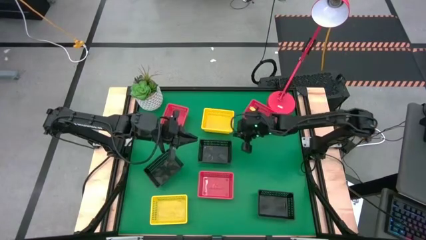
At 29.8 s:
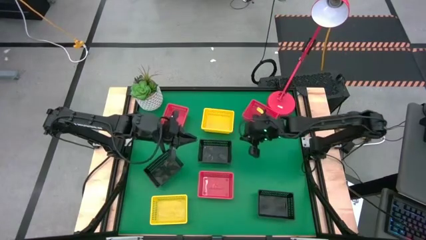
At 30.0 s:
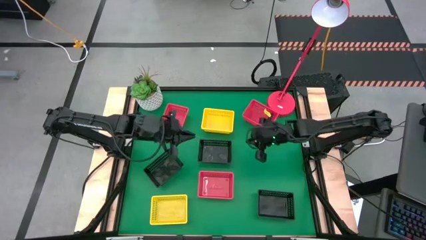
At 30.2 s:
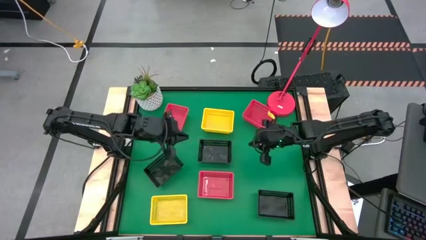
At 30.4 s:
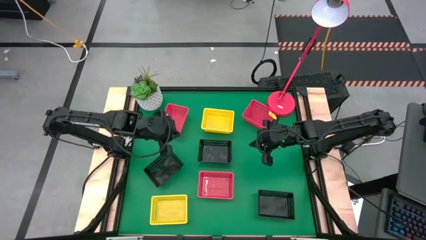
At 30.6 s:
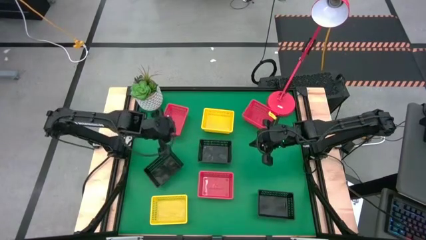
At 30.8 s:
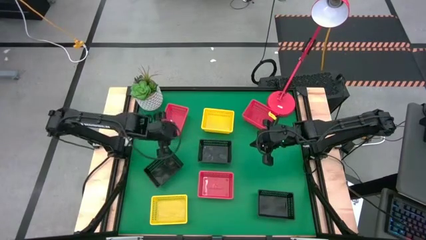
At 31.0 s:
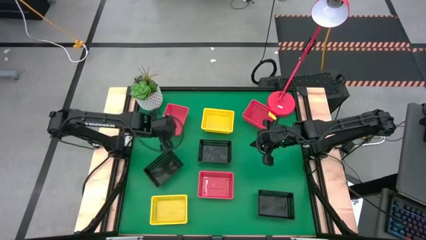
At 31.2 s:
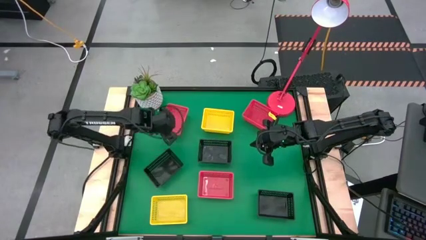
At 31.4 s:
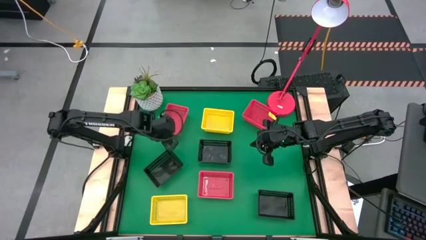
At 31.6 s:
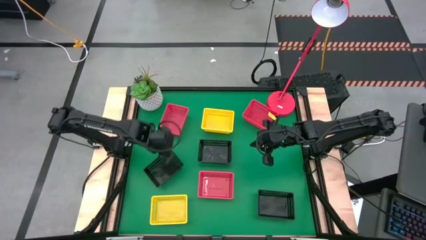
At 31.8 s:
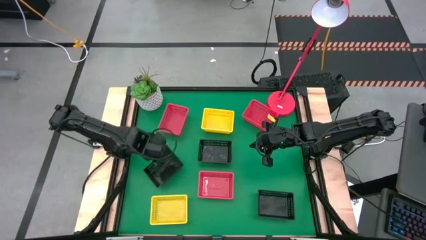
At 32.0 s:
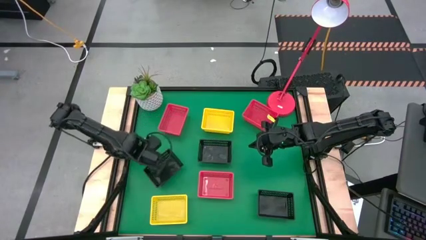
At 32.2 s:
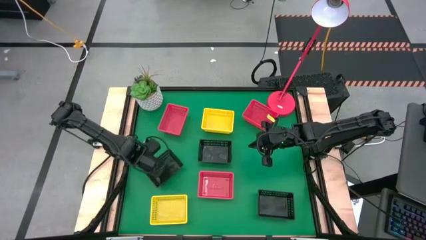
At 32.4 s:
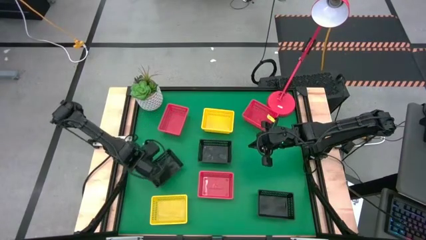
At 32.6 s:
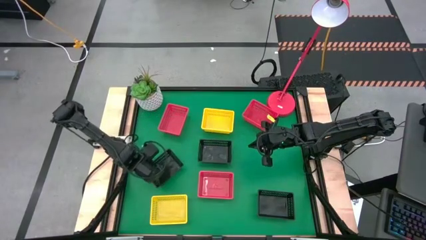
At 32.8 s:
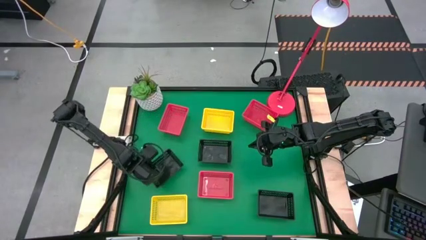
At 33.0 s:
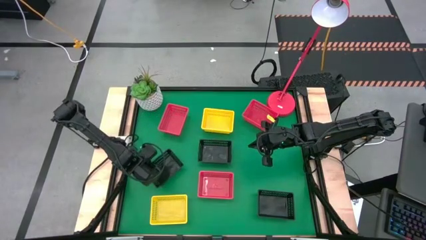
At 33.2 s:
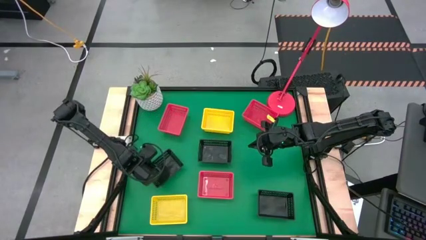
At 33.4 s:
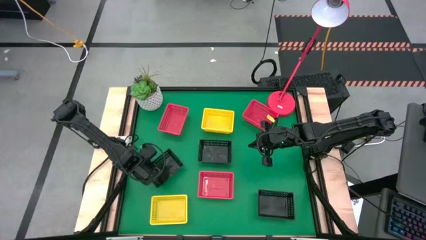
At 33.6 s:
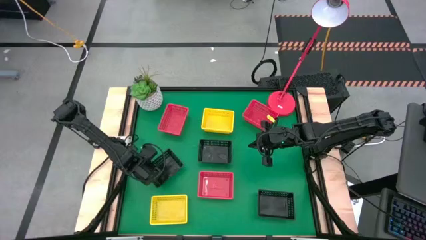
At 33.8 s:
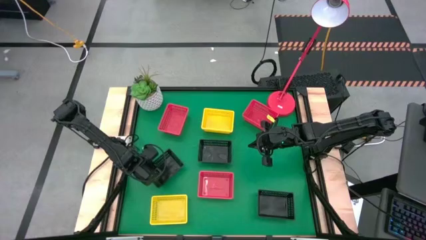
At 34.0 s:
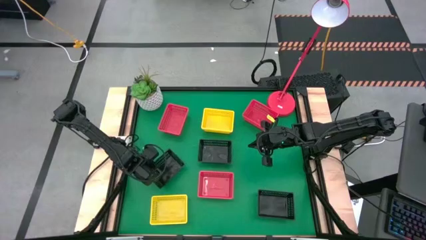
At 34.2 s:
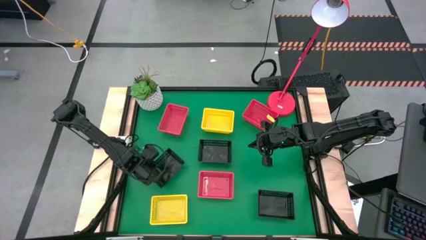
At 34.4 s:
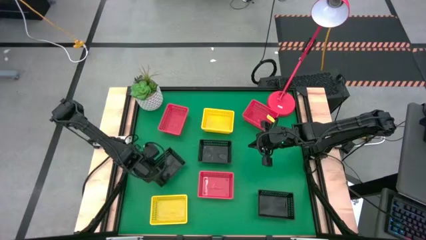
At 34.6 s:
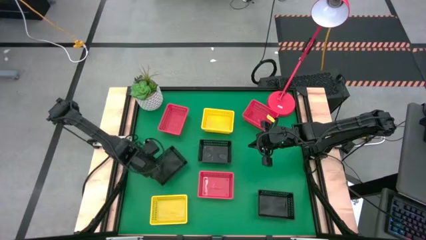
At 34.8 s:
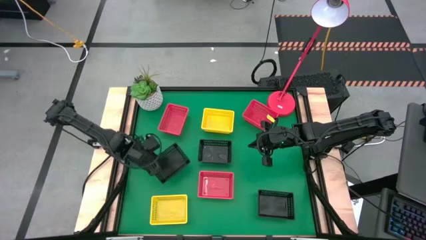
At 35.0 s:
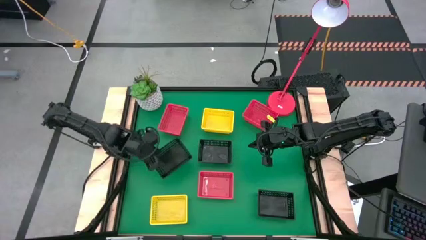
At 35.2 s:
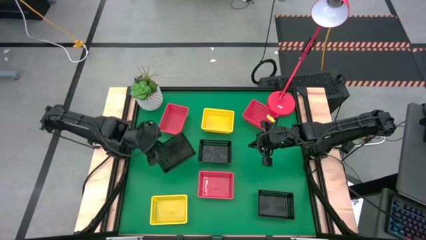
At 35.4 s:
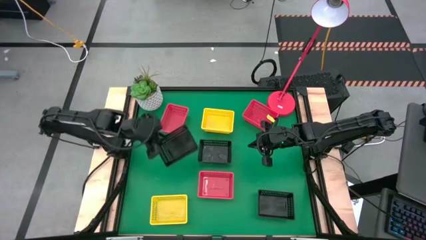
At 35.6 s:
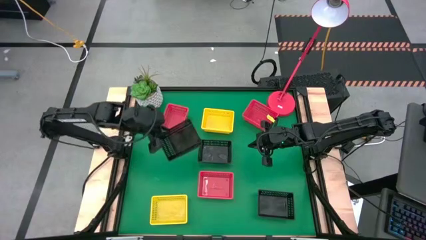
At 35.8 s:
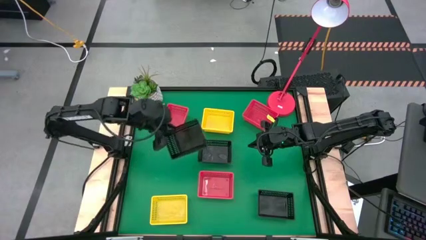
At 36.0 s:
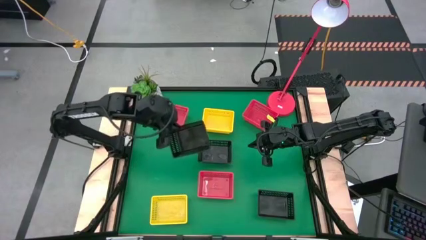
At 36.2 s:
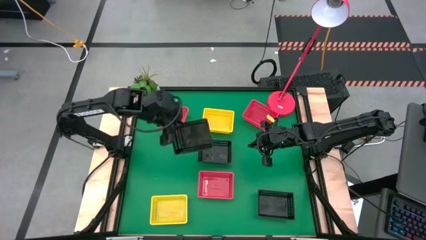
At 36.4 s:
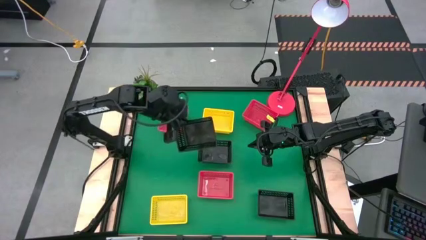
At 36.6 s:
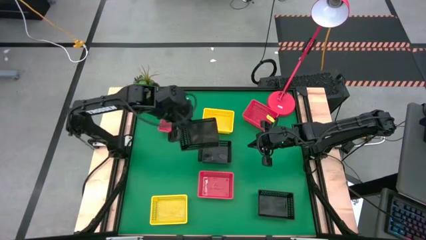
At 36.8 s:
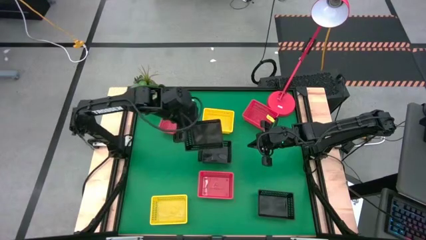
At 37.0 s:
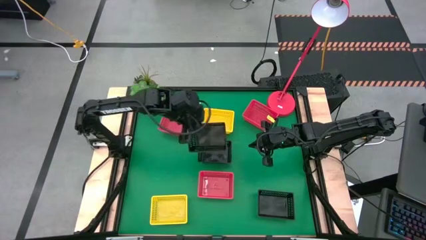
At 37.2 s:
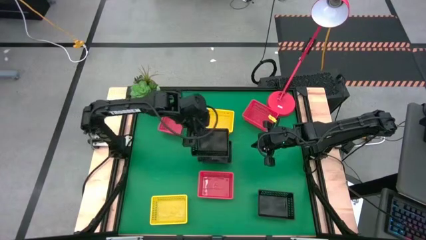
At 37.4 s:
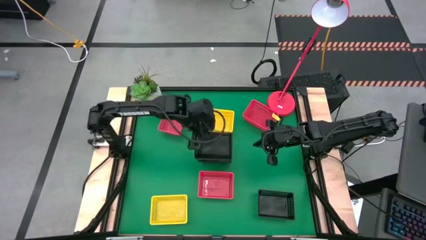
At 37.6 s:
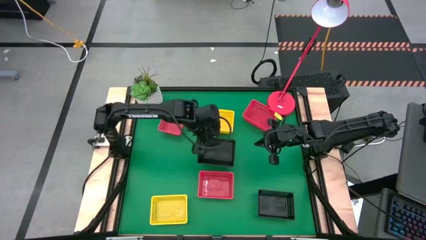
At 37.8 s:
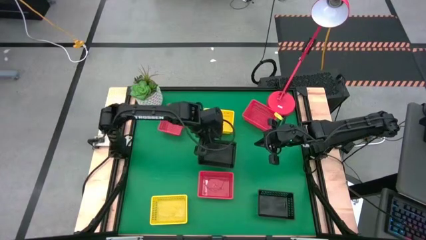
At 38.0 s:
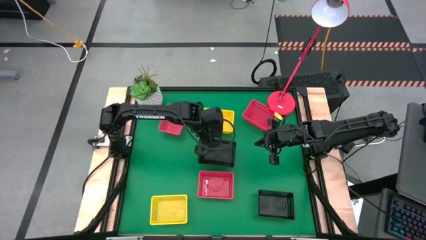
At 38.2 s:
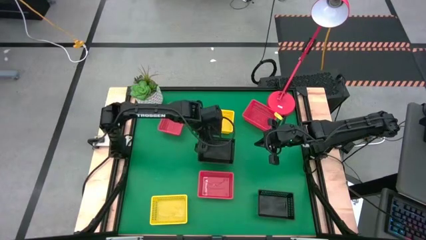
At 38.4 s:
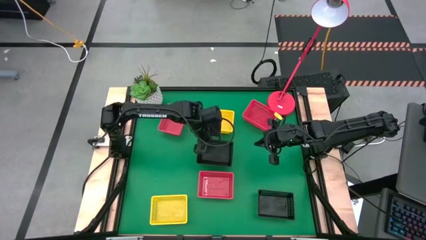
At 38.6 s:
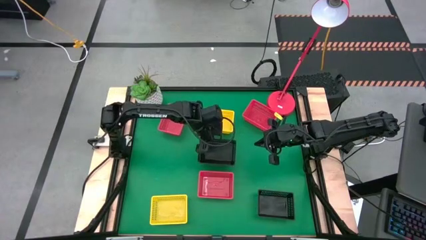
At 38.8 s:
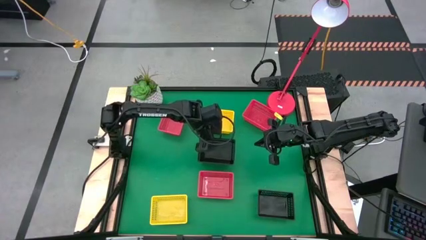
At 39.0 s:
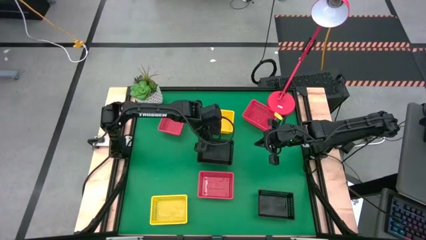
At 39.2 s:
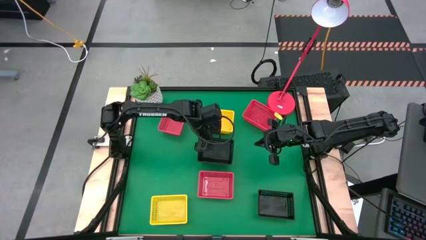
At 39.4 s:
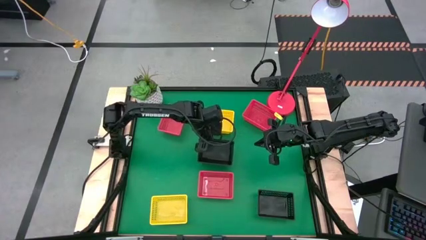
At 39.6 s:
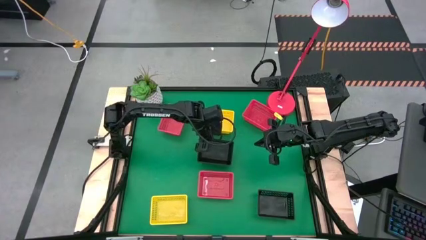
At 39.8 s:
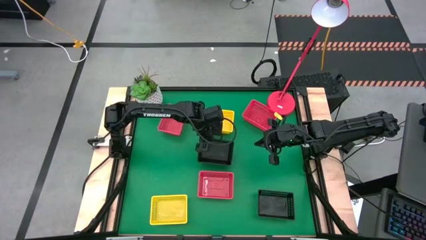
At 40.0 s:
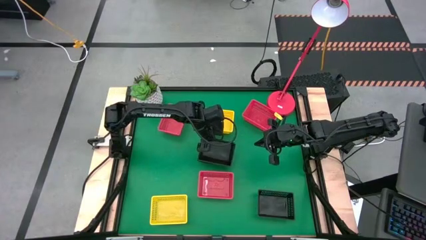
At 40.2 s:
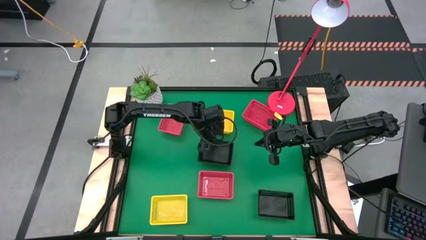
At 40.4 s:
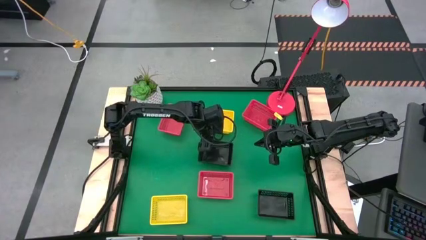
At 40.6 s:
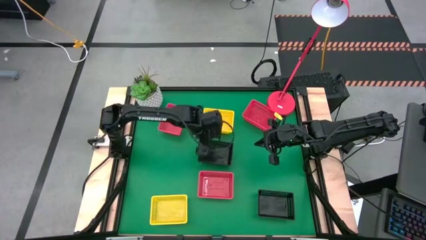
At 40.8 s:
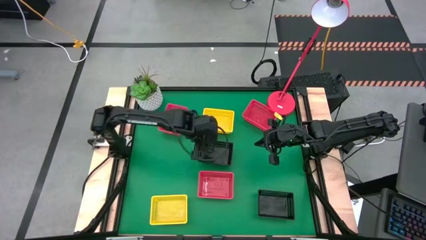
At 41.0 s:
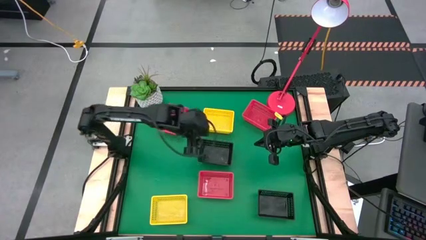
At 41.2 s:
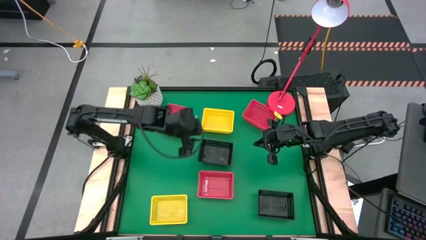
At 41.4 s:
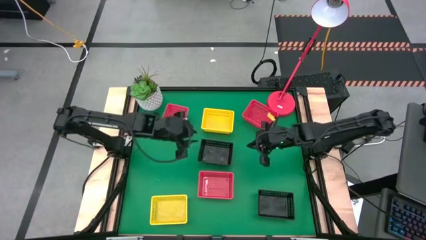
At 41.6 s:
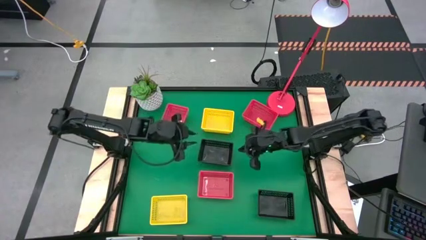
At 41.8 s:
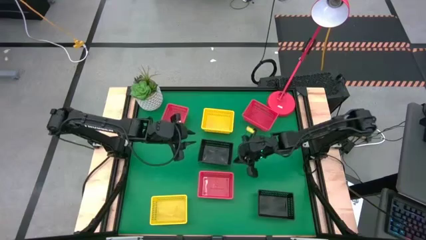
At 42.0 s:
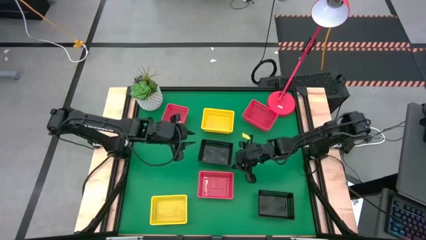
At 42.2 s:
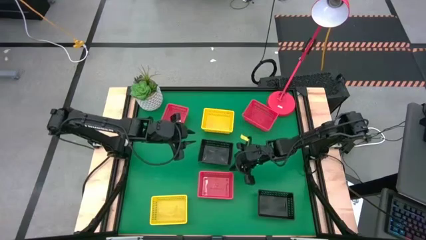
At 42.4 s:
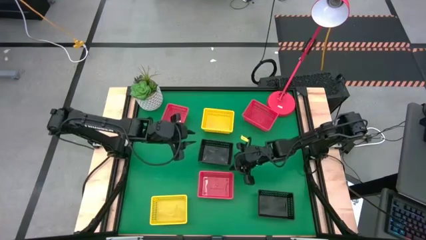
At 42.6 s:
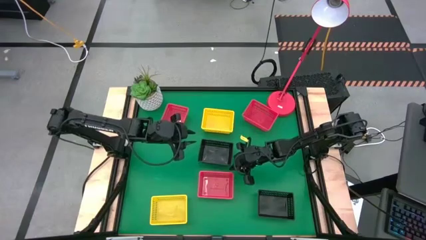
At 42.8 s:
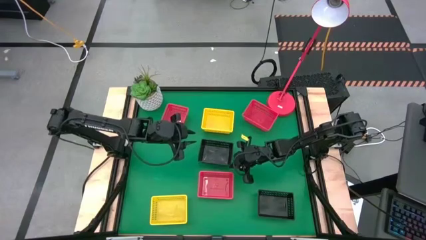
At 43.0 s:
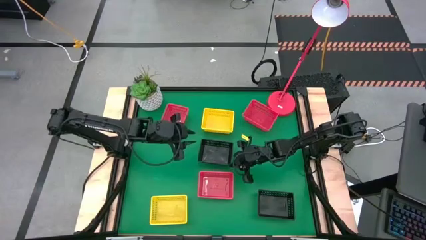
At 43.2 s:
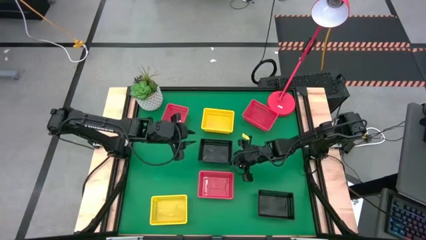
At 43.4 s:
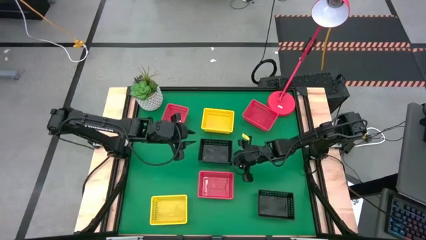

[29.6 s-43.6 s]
Stack the top left black basket on the top right black basket

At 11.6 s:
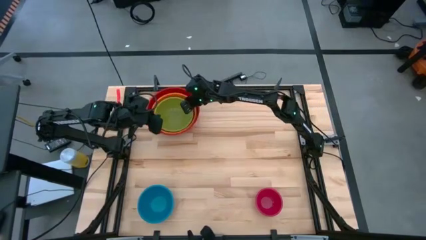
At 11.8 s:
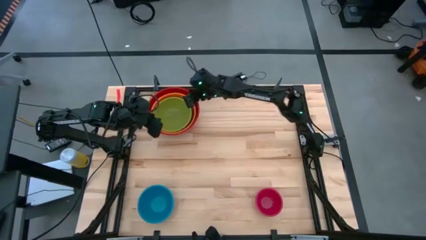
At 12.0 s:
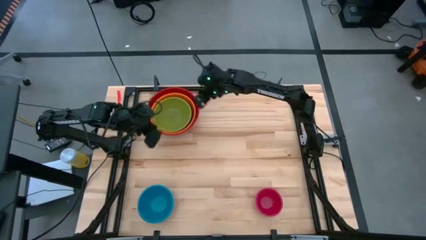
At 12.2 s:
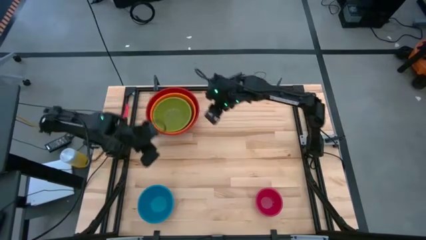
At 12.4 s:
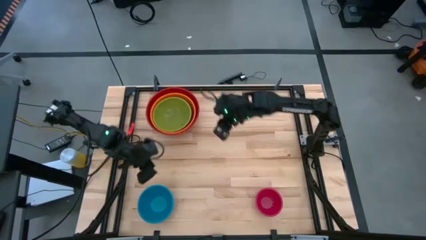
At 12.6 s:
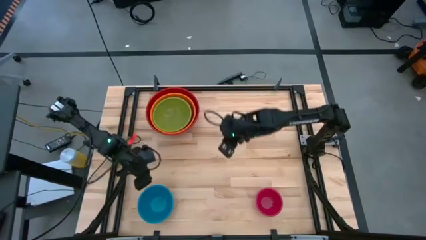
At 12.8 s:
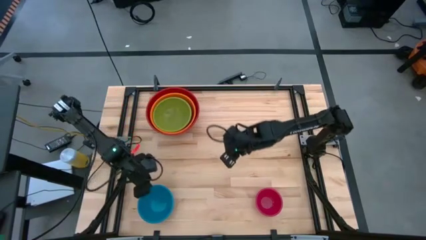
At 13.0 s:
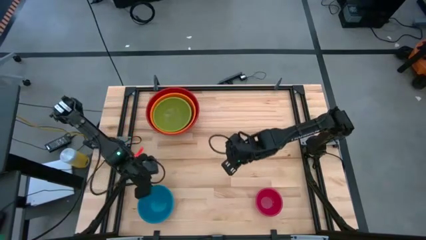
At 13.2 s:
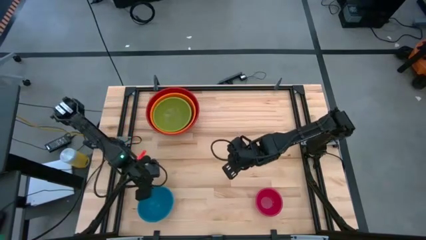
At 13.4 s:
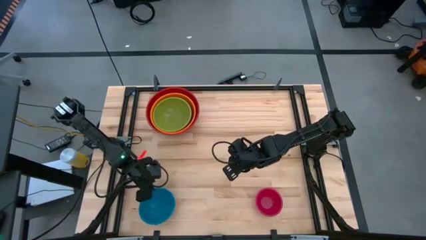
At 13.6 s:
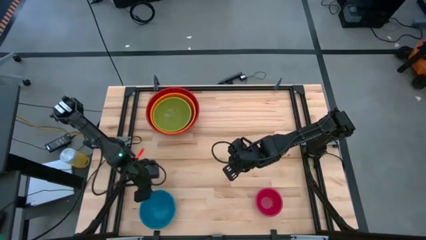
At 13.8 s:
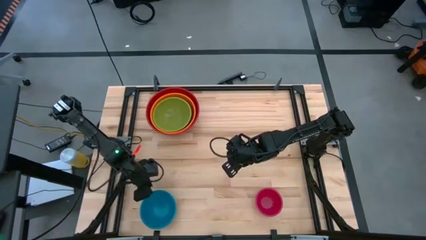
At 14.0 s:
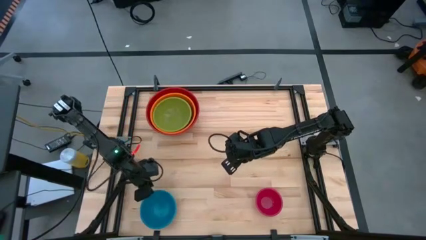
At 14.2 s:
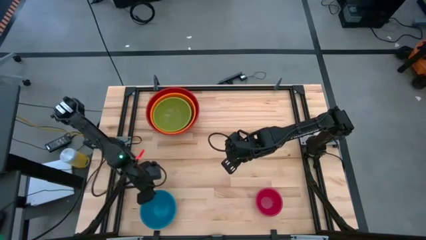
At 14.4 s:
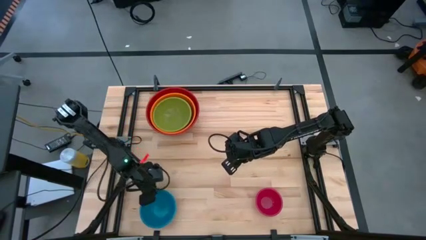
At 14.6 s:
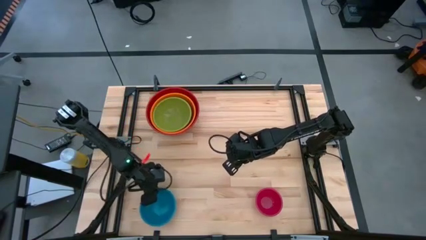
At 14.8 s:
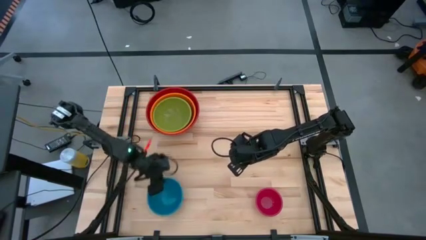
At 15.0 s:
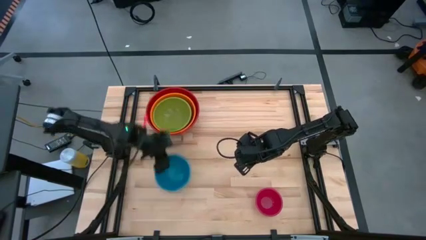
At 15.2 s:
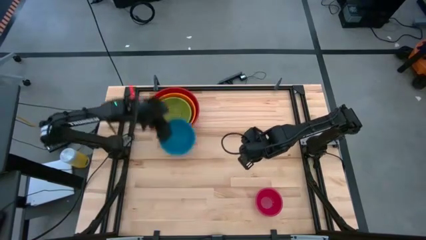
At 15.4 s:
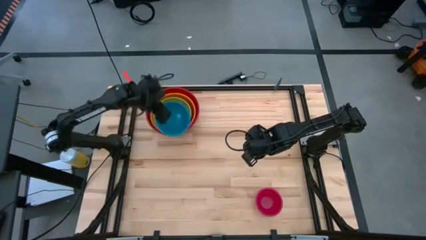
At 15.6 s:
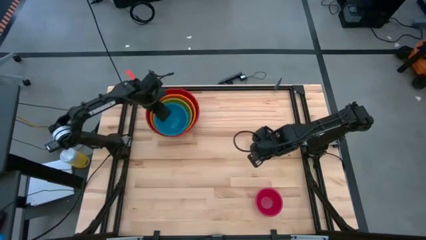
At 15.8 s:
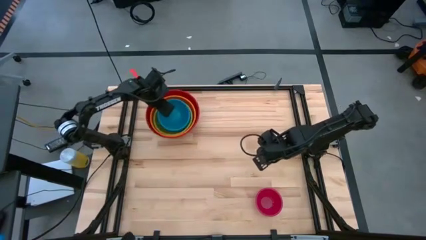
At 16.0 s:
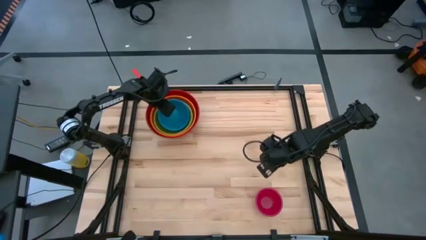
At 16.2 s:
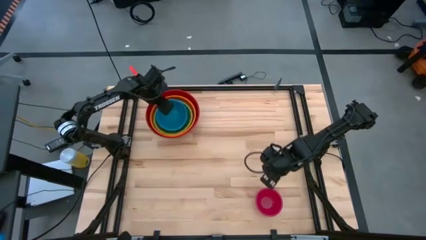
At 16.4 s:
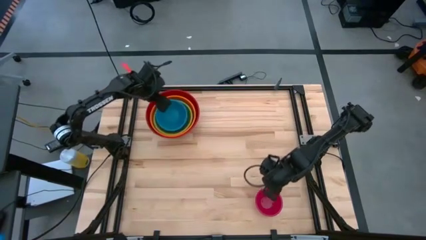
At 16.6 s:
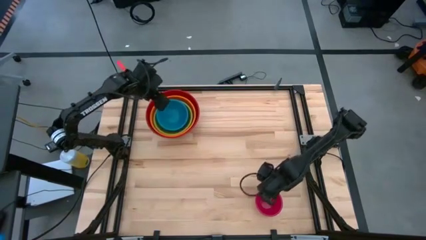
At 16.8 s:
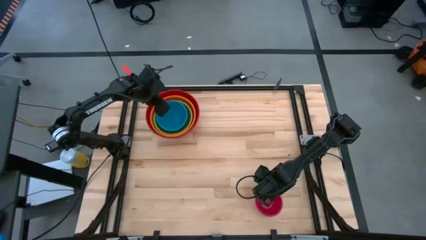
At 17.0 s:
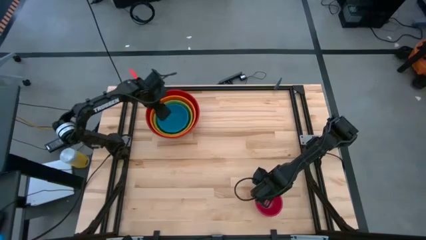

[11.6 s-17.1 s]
Stack the blue bowl on the green bowl
